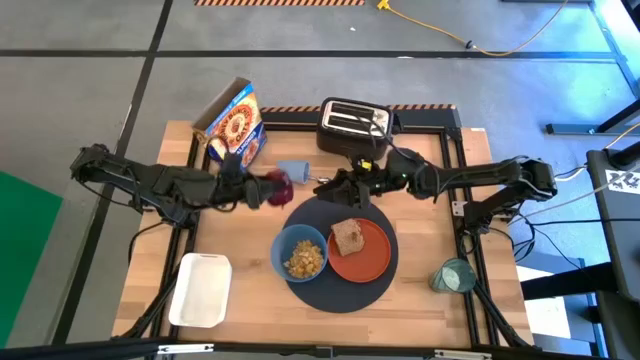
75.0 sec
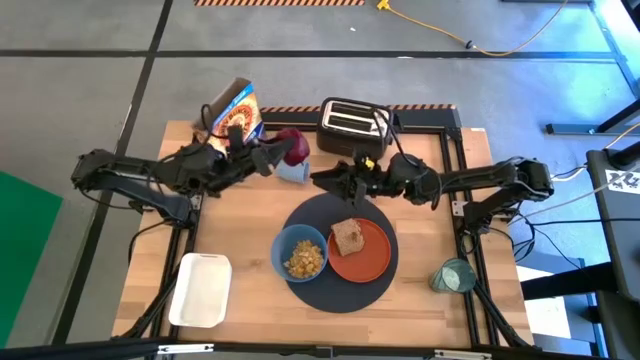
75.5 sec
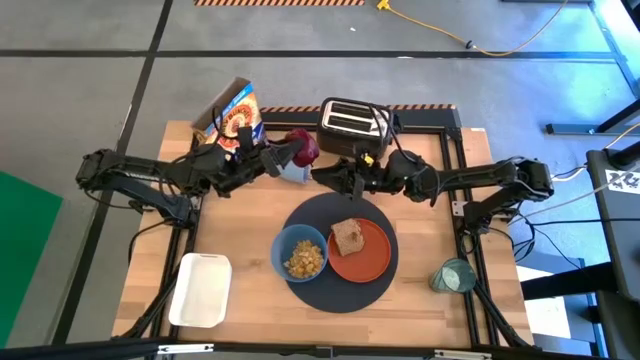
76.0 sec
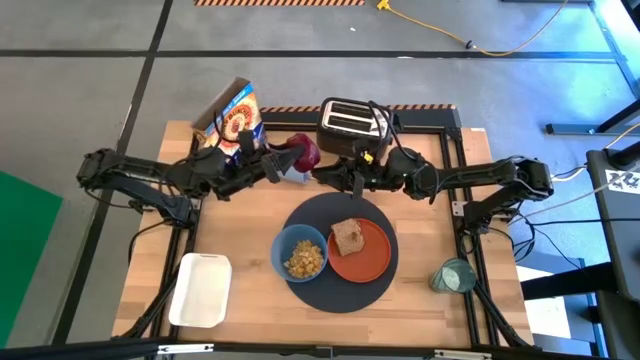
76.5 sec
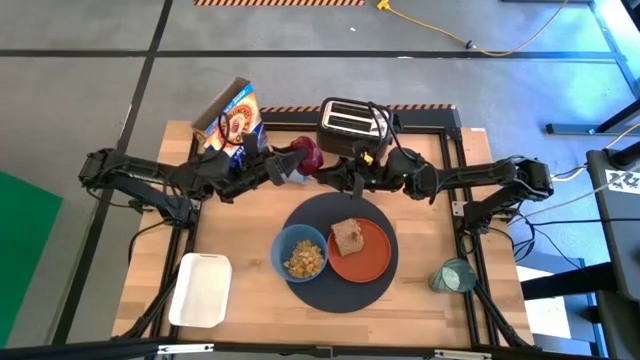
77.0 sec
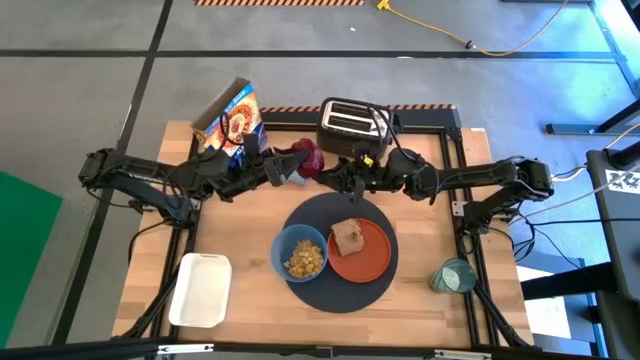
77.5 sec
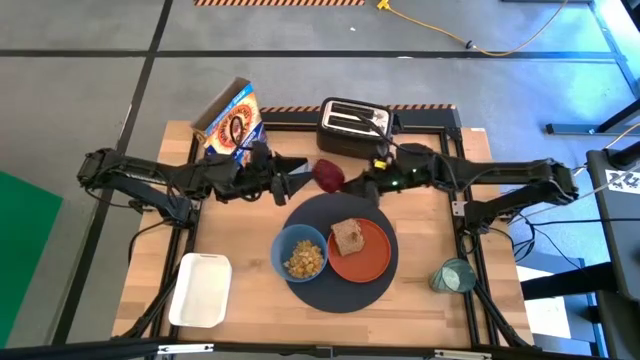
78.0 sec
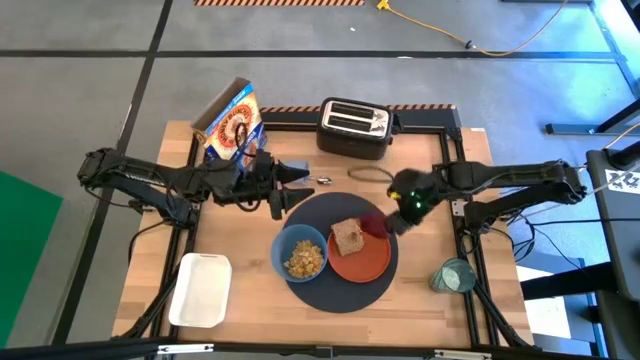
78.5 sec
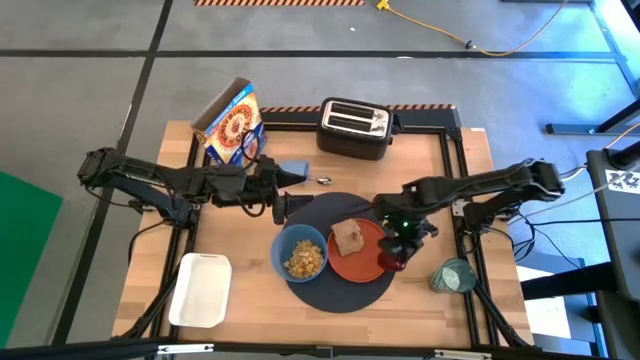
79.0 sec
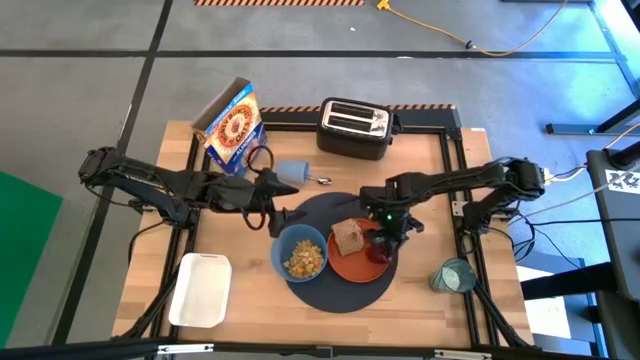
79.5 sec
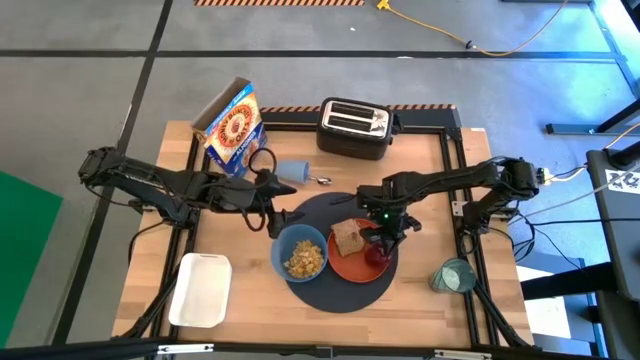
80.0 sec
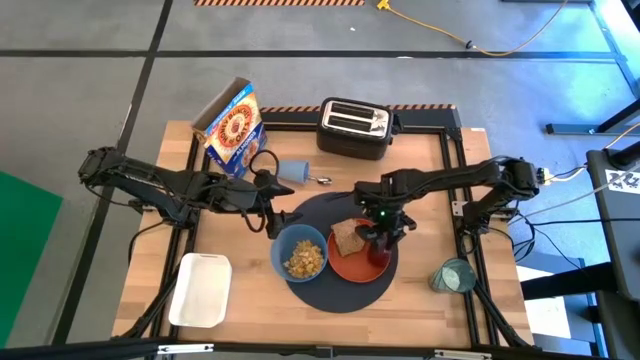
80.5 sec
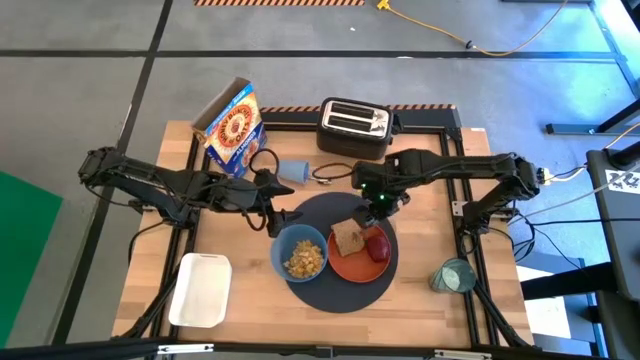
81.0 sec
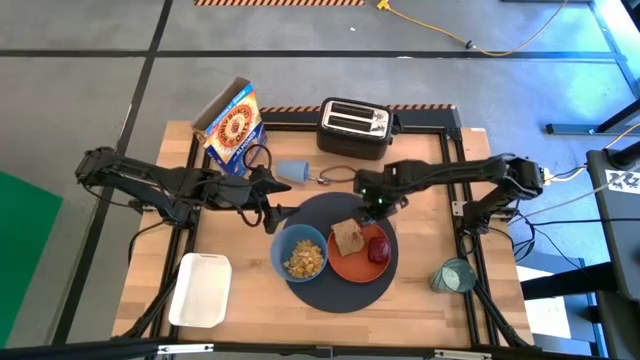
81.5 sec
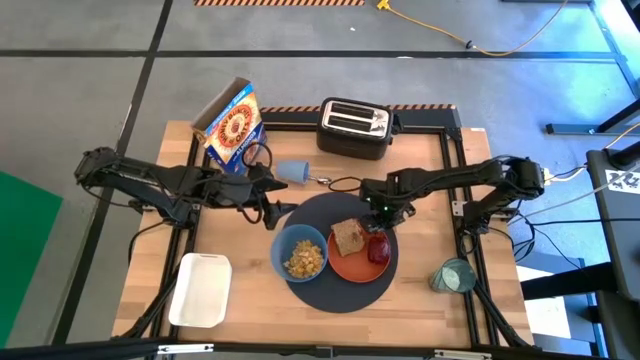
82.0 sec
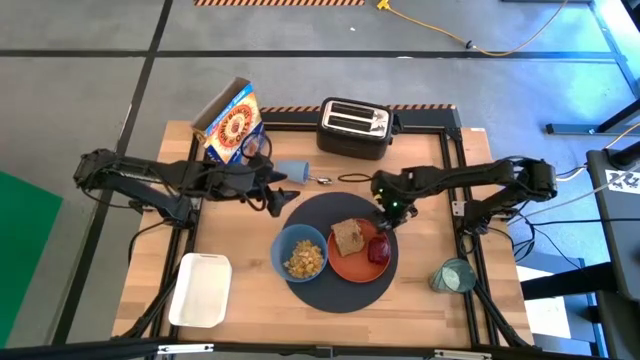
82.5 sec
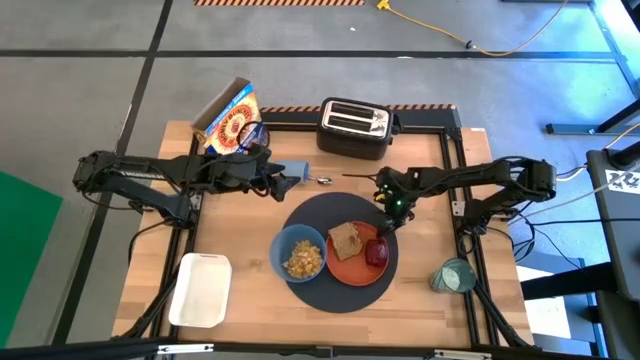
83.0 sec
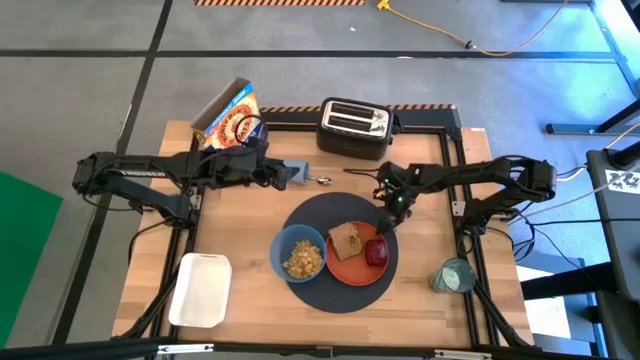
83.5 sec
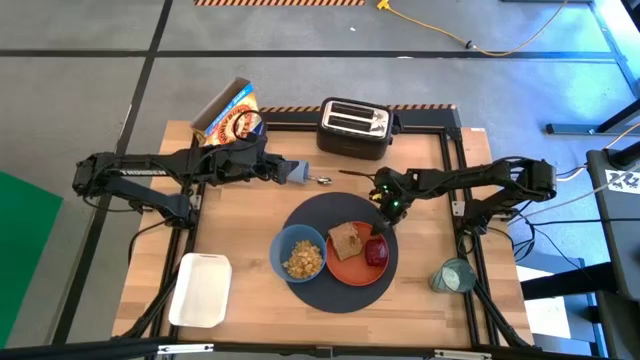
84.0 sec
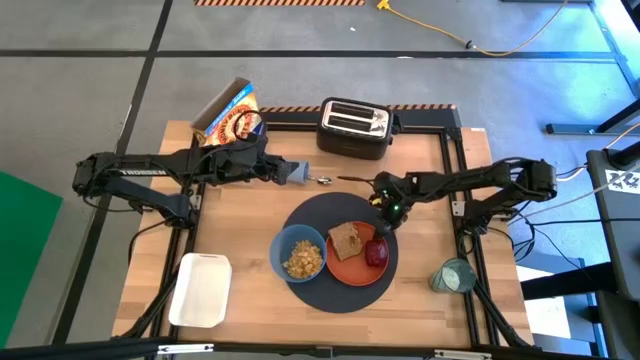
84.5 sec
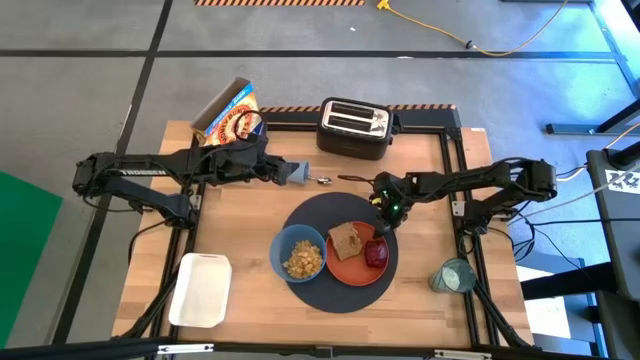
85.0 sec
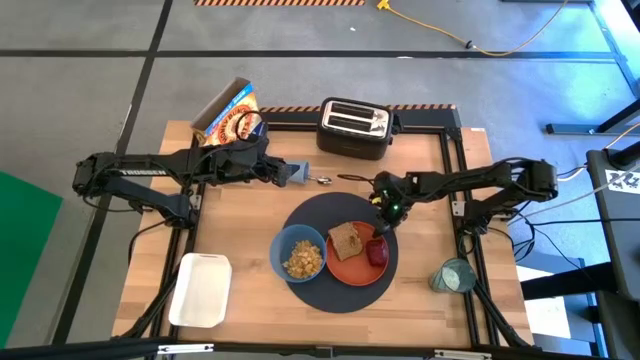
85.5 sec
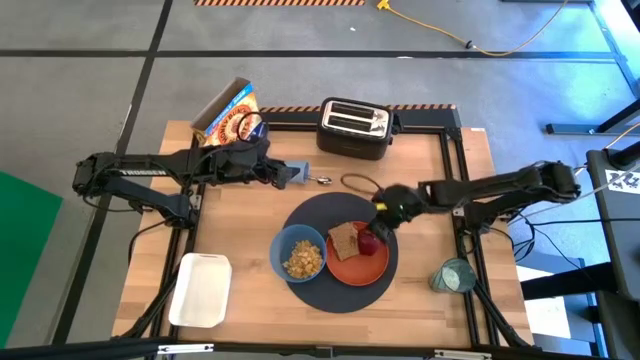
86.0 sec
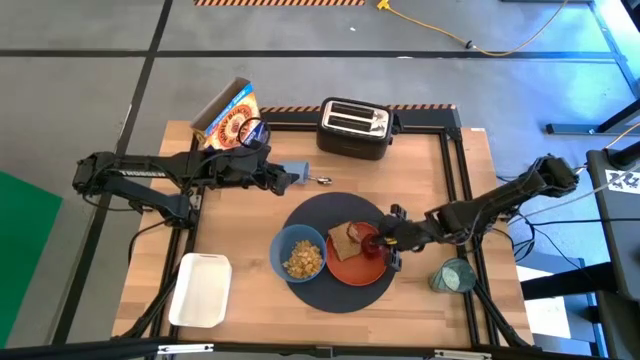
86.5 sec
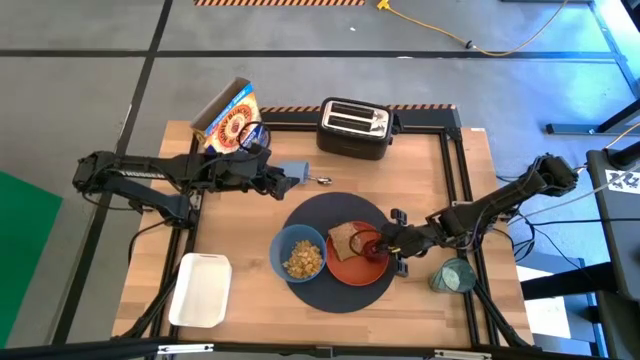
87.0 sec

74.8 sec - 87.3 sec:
Task: Arrange a breakfast setting
Put the red apple from the white bin onto the orange plate

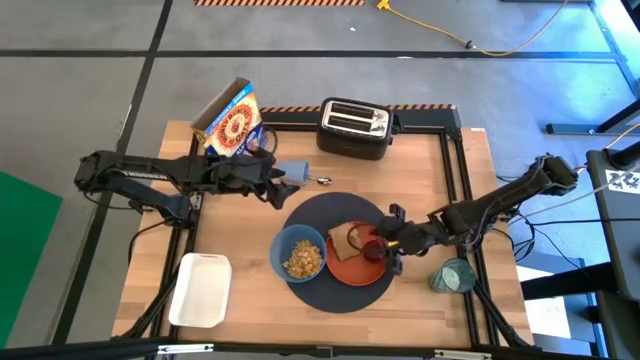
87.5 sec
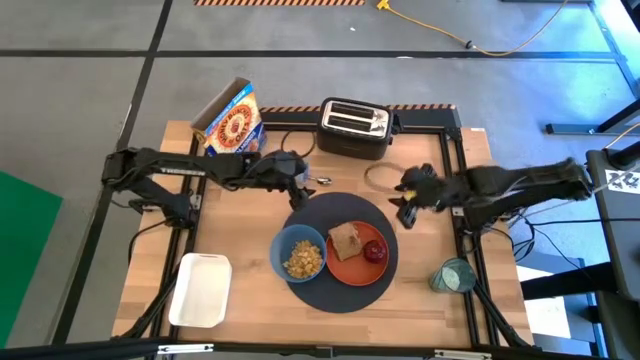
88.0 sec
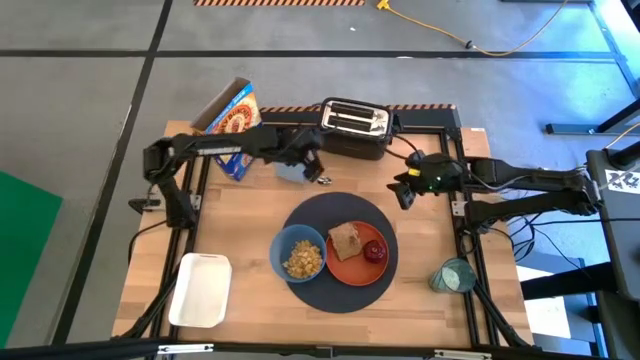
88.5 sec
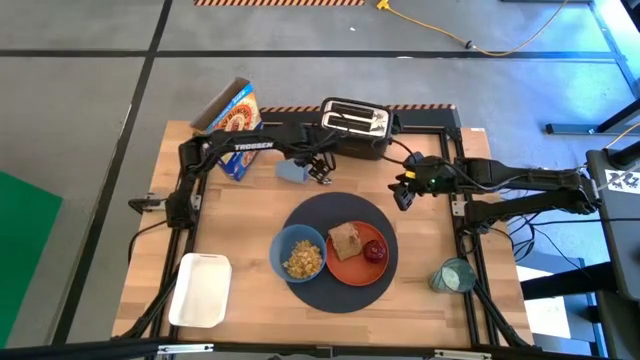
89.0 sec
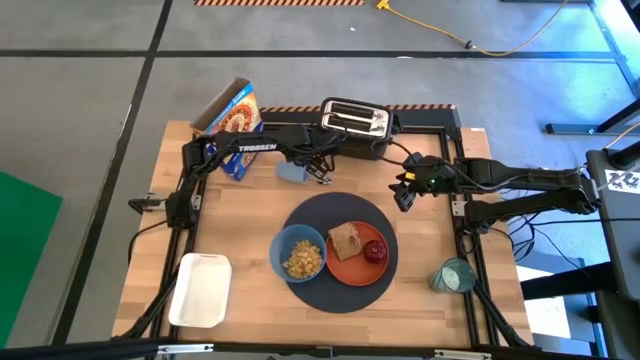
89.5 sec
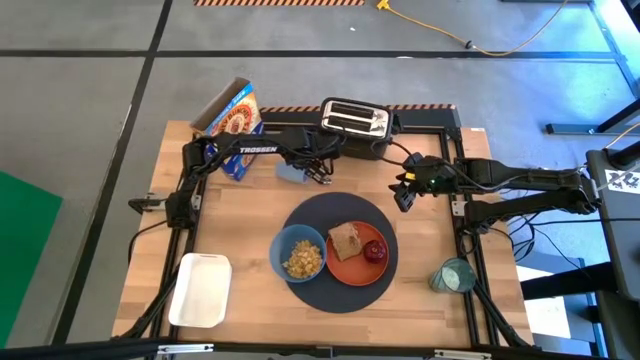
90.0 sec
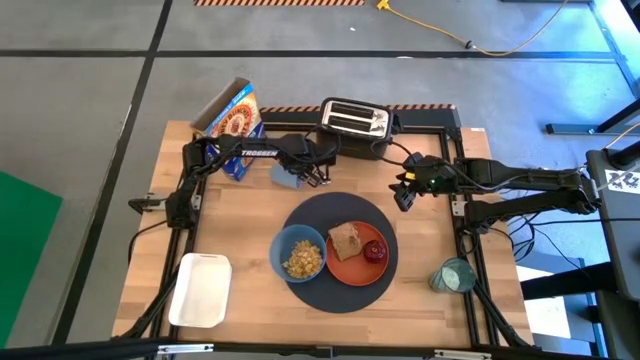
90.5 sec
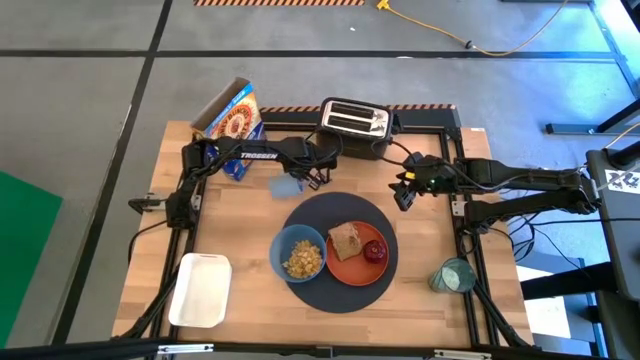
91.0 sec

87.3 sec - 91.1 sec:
Adjust the blue cup

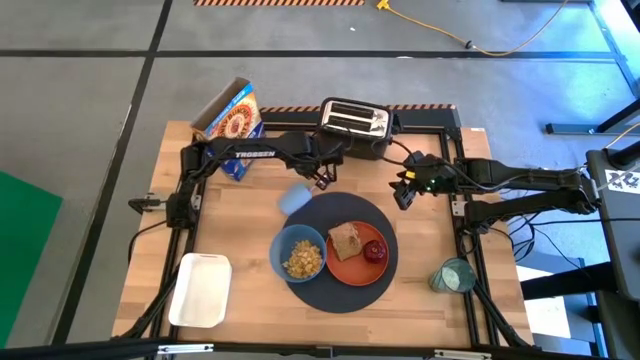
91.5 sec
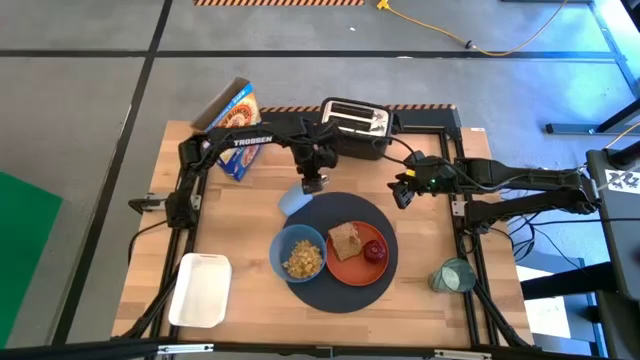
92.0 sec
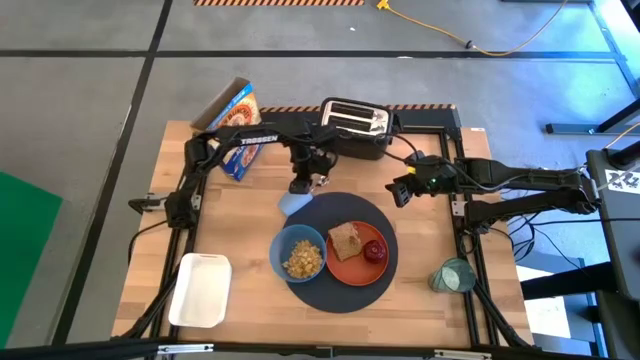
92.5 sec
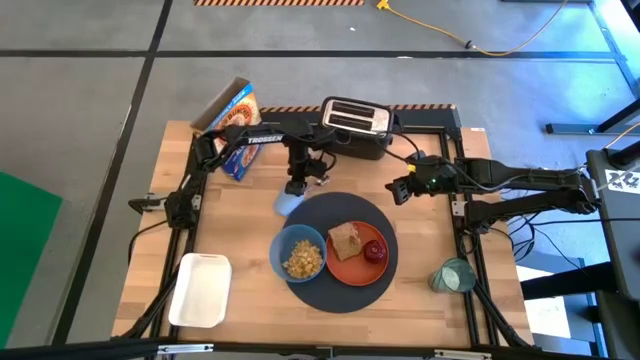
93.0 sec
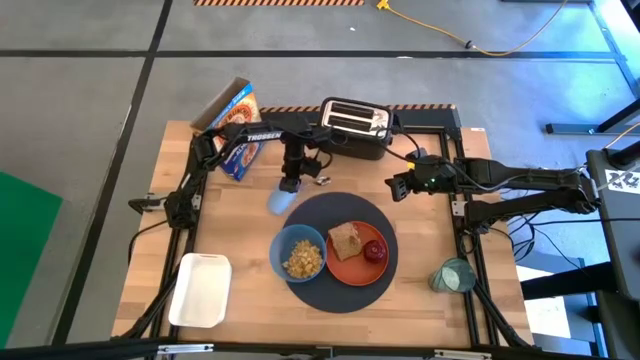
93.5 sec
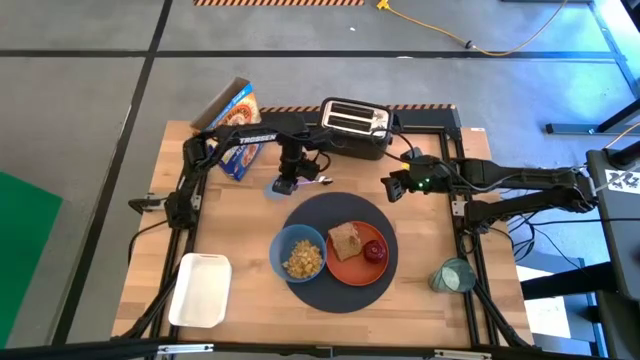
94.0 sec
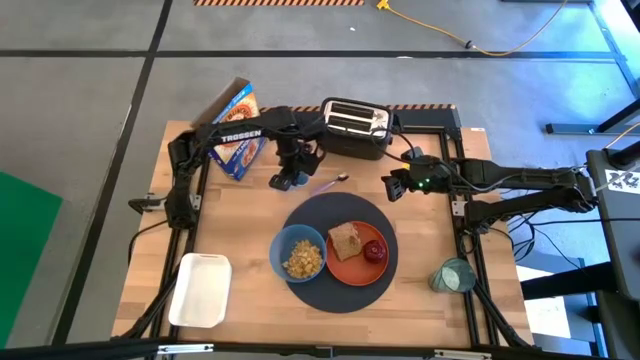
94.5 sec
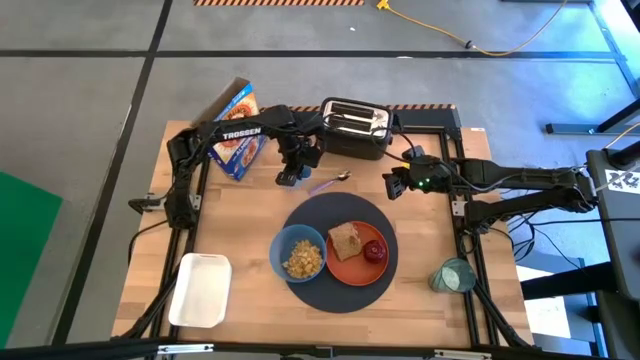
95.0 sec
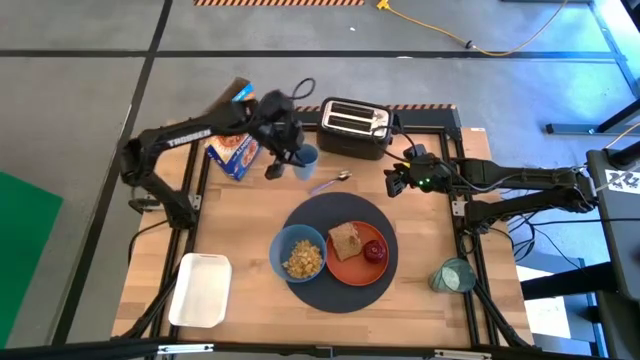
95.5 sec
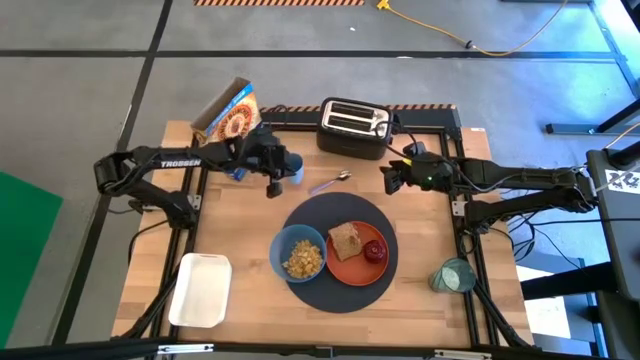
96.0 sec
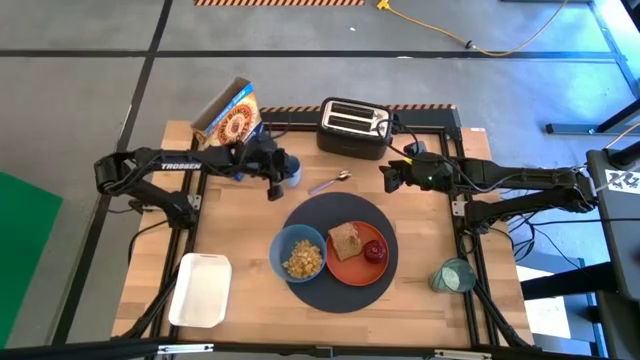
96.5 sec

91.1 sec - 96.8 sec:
Adjust the blue cup
